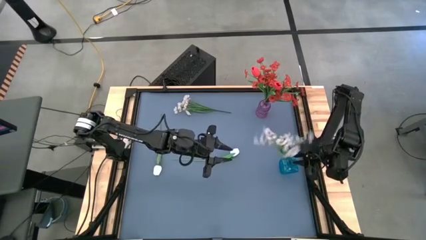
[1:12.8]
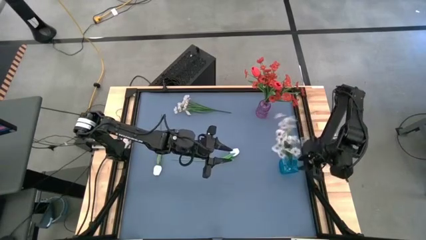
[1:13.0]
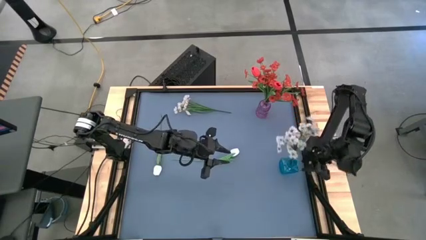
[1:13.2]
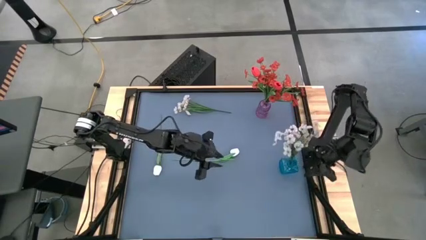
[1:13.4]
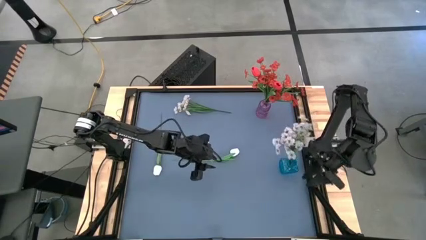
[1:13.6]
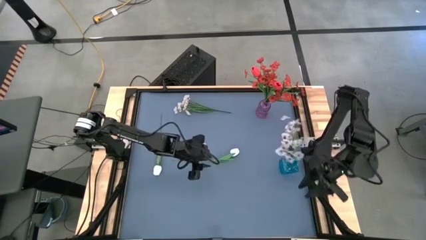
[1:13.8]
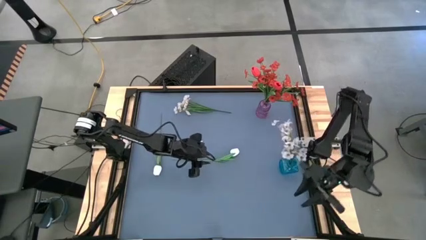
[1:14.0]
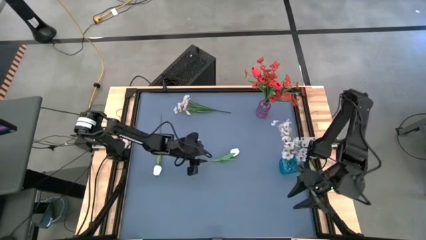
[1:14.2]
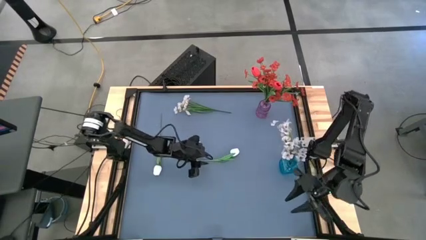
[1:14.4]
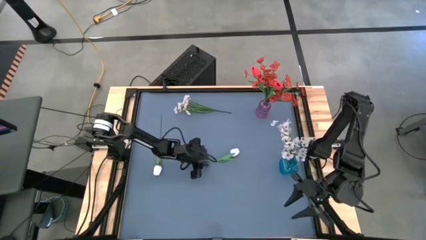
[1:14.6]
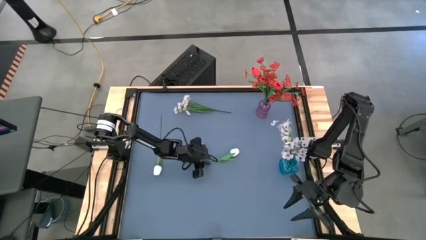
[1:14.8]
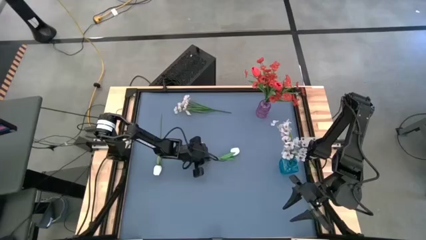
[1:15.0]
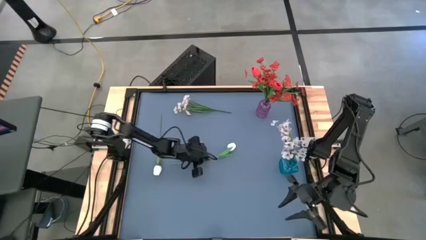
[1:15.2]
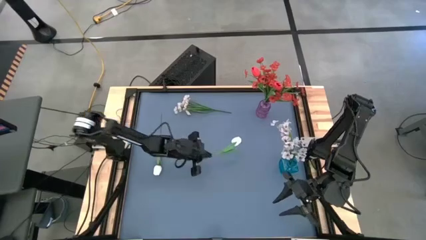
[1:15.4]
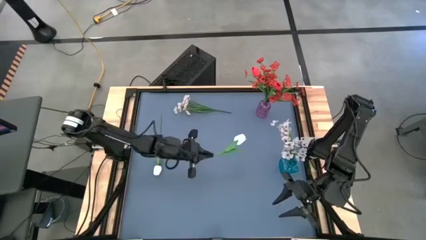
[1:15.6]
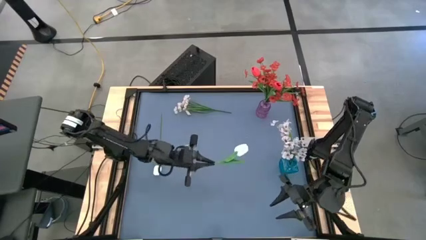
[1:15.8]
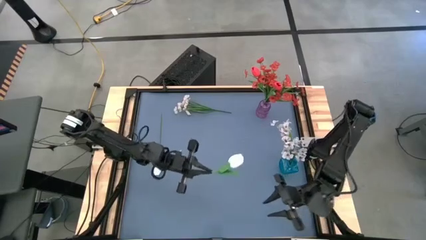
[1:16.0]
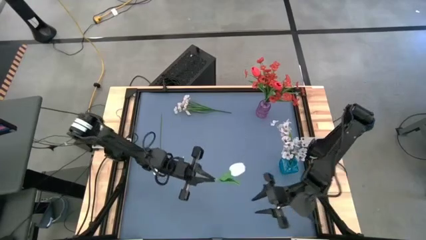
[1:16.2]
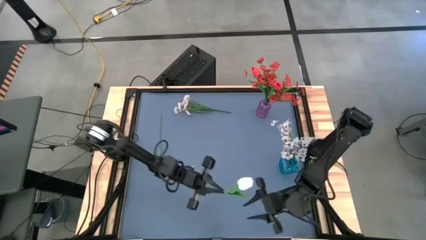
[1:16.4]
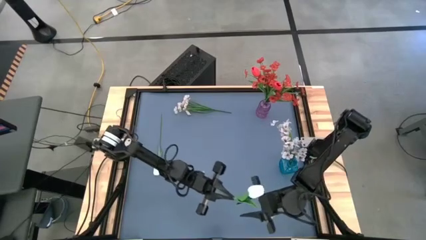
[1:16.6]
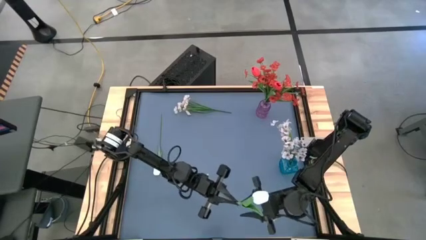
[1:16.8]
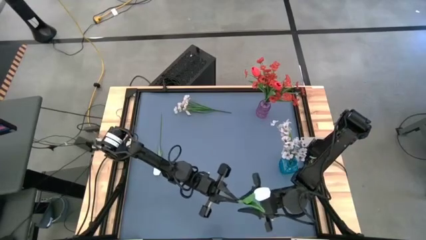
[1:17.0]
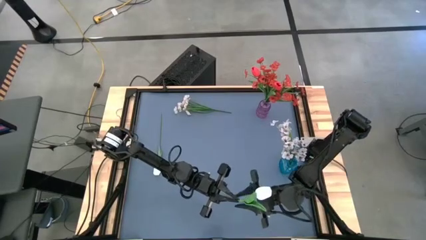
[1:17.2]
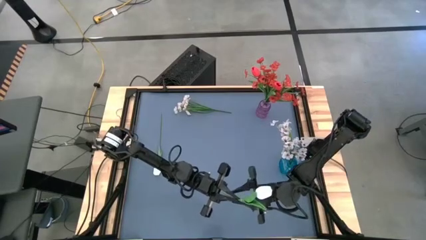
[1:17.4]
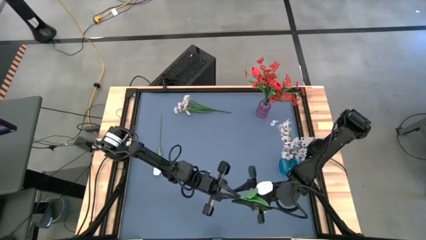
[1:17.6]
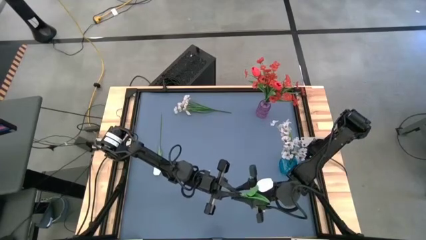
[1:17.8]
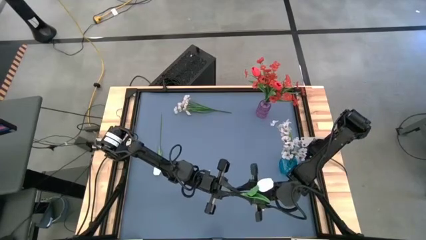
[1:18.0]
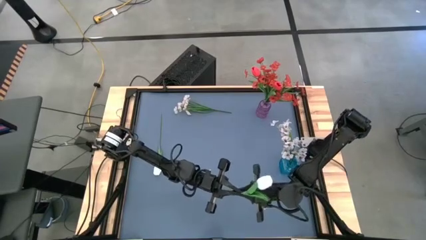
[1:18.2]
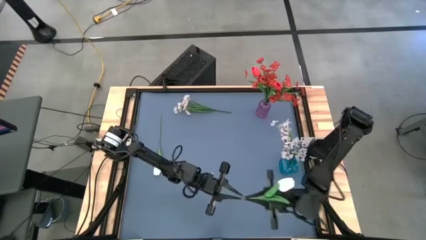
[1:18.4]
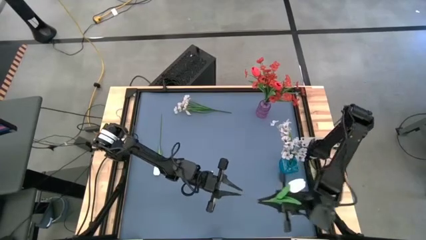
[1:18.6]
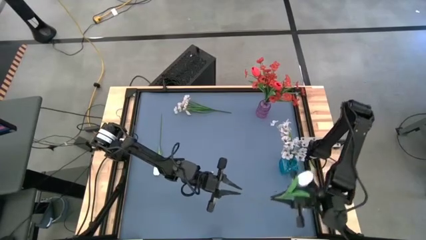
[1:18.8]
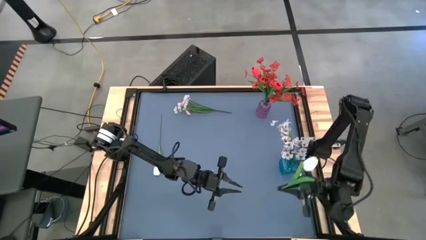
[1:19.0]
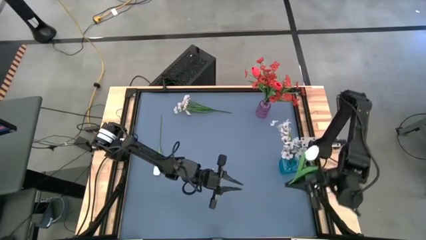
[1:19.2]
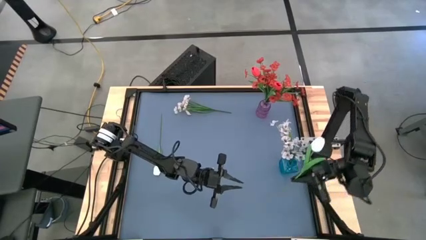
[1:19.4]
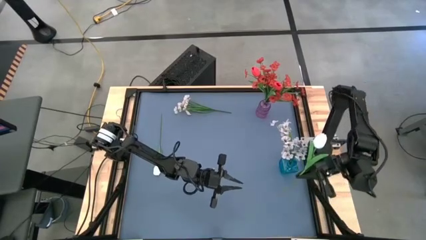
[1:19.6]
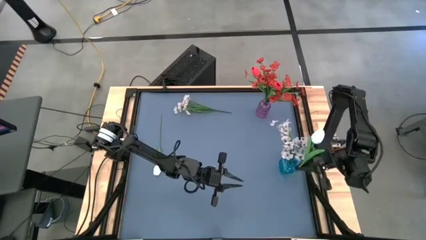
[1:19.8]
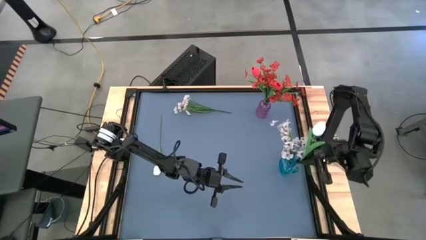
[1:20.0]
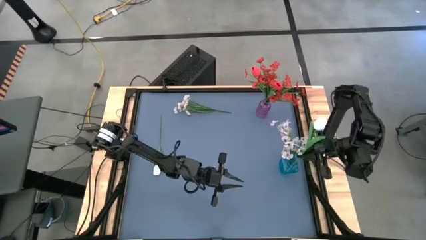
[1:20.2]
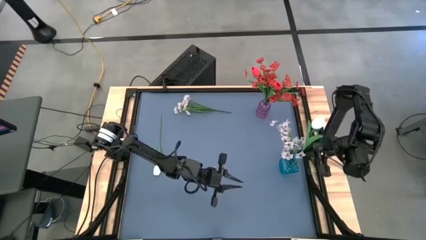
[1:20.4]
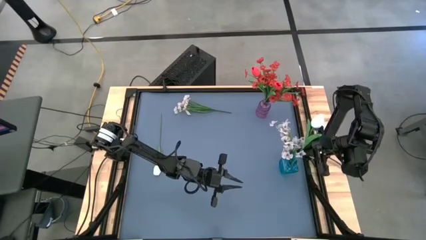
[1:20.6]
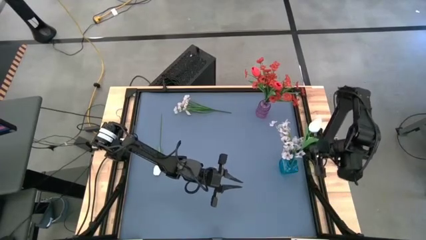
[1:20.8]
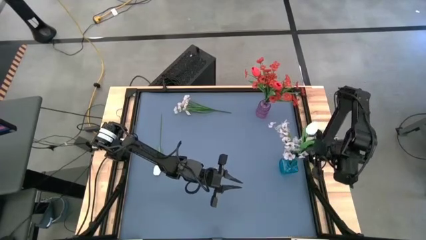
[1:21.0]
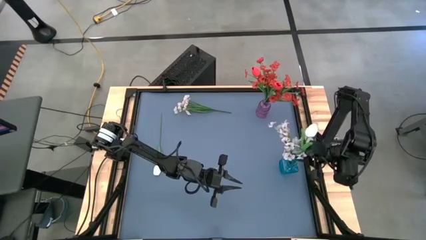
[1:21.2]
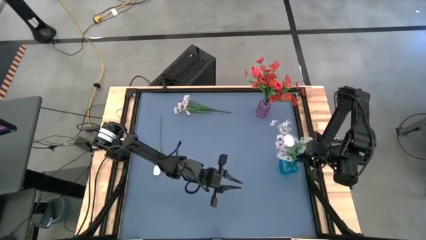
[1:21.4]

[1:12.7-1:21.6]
Task: Sort flowers into vase by color
Put the right white tulip into the blue vase

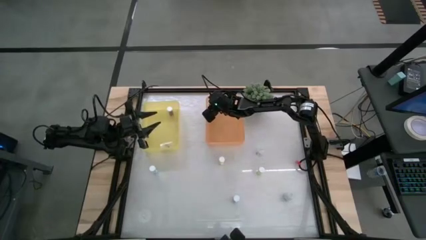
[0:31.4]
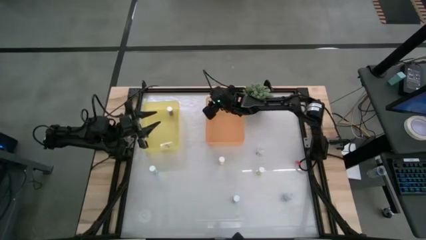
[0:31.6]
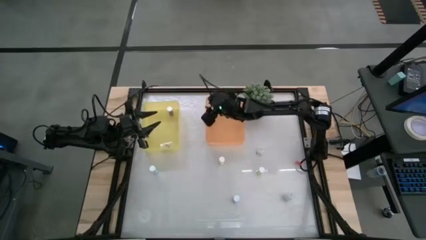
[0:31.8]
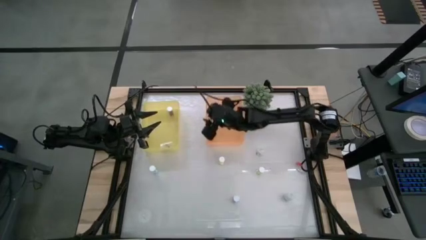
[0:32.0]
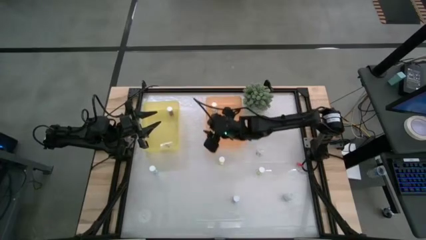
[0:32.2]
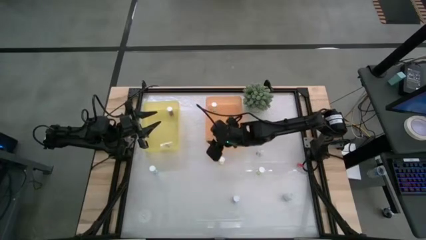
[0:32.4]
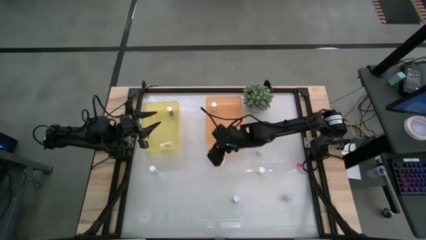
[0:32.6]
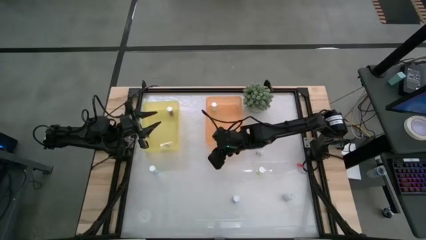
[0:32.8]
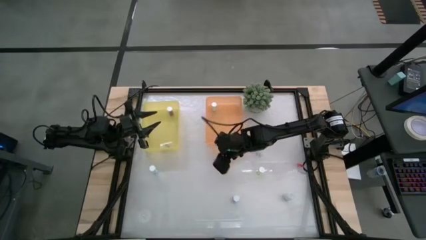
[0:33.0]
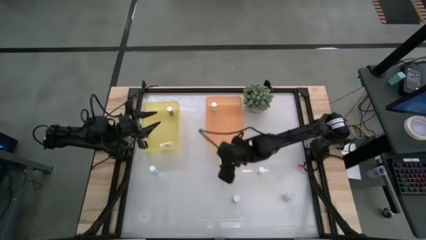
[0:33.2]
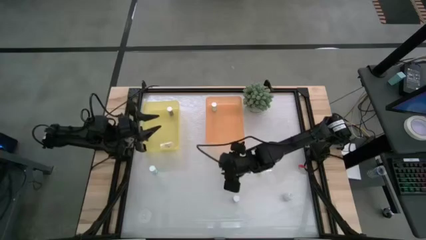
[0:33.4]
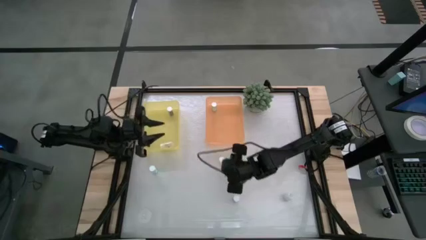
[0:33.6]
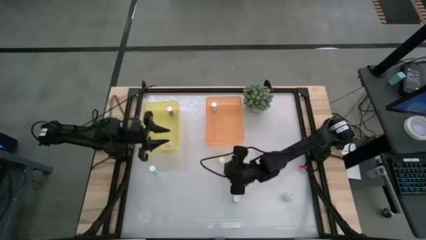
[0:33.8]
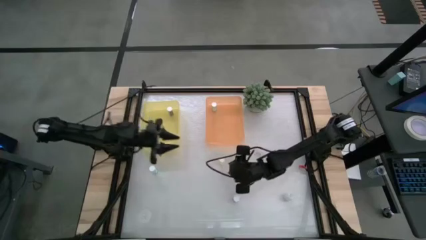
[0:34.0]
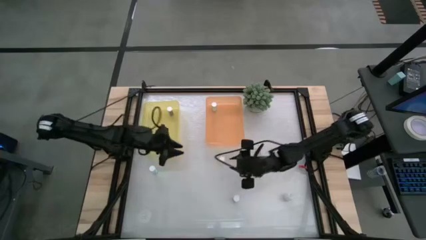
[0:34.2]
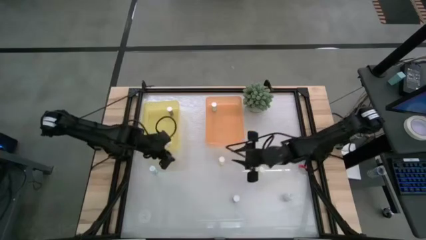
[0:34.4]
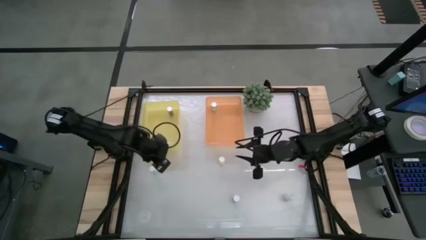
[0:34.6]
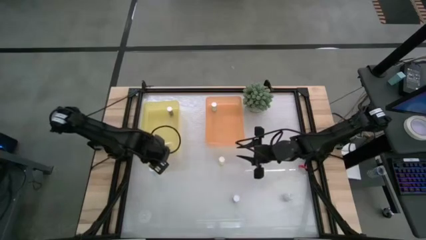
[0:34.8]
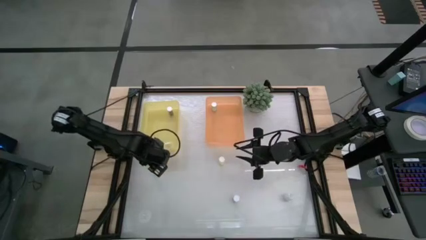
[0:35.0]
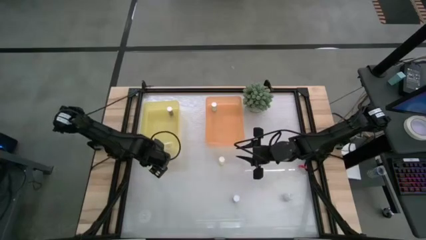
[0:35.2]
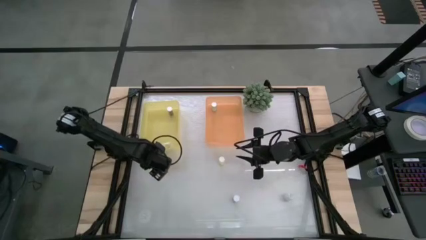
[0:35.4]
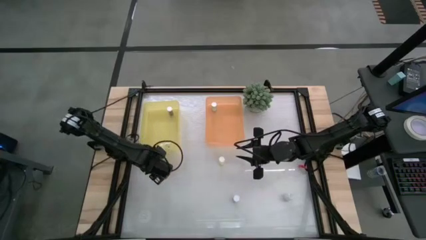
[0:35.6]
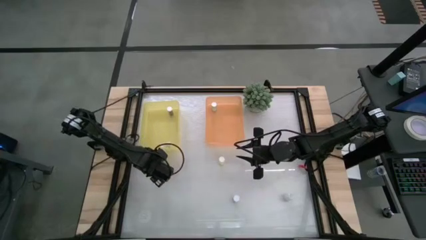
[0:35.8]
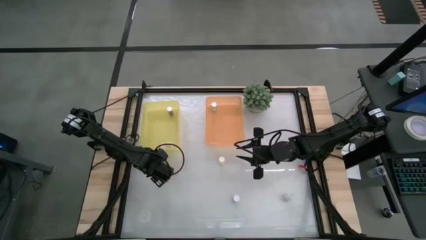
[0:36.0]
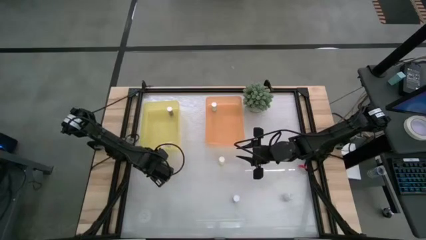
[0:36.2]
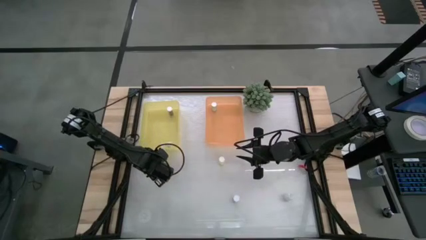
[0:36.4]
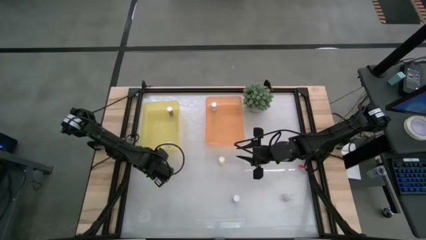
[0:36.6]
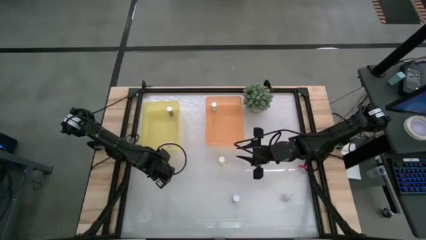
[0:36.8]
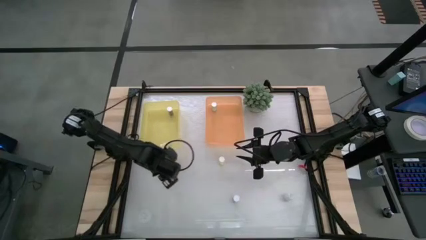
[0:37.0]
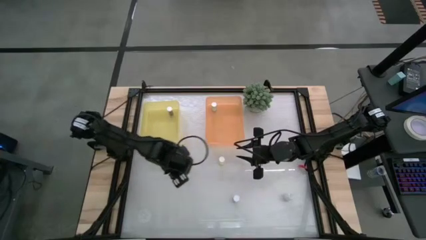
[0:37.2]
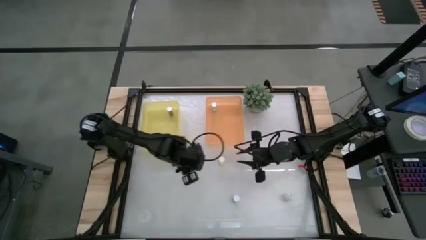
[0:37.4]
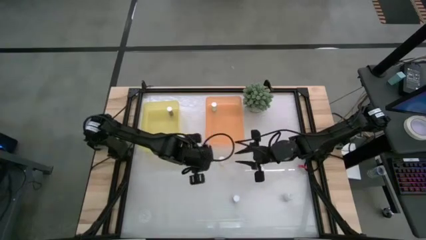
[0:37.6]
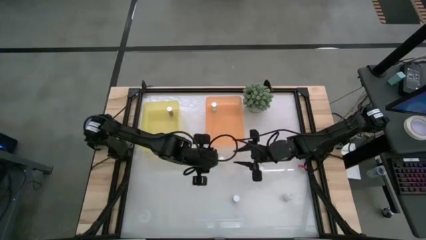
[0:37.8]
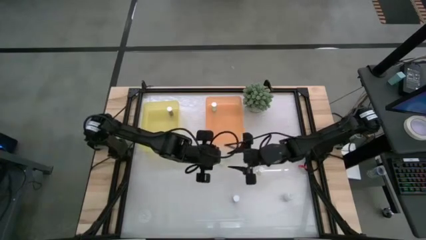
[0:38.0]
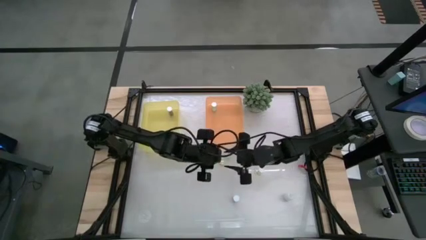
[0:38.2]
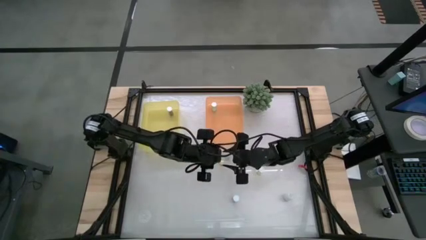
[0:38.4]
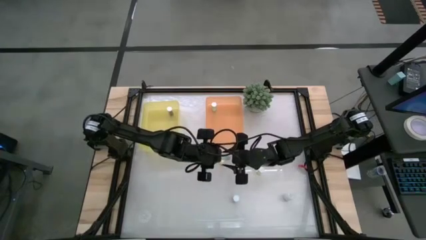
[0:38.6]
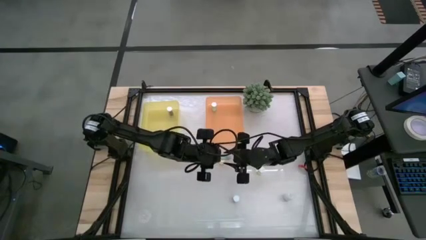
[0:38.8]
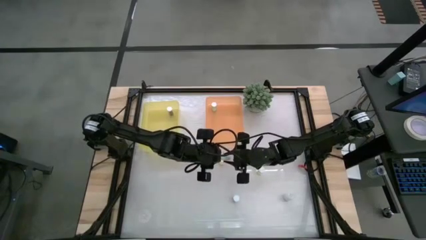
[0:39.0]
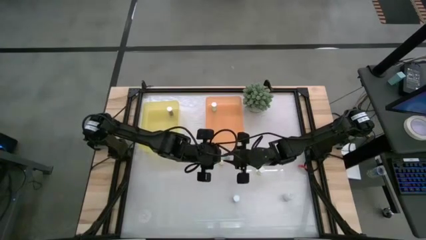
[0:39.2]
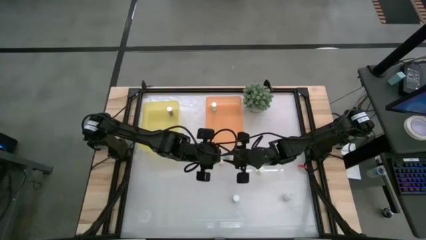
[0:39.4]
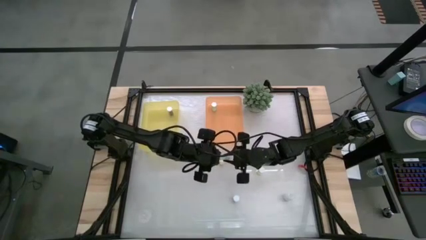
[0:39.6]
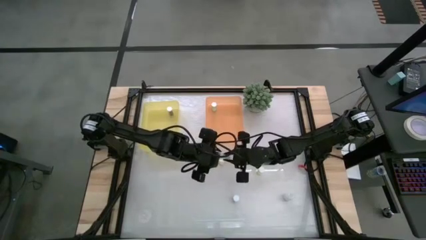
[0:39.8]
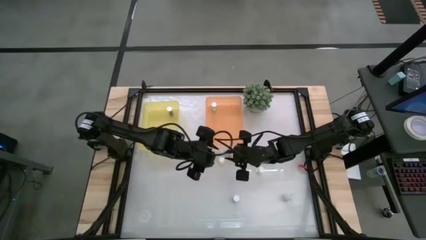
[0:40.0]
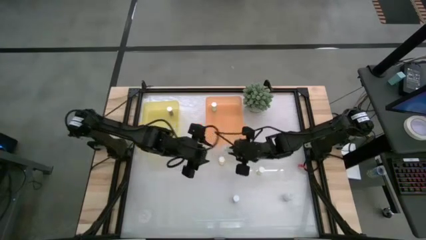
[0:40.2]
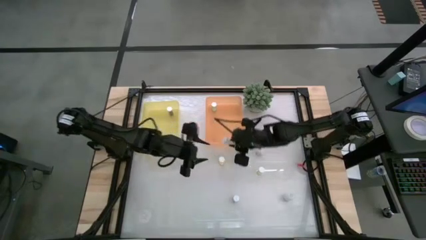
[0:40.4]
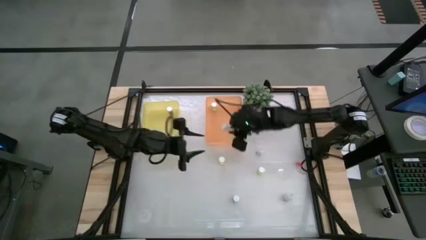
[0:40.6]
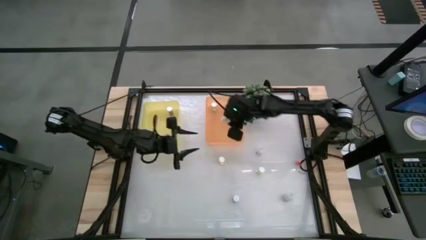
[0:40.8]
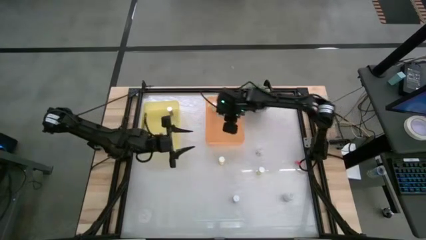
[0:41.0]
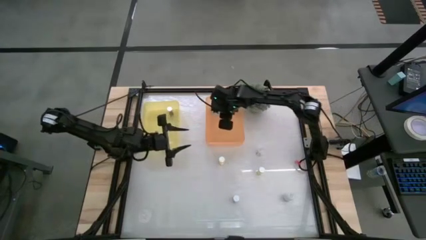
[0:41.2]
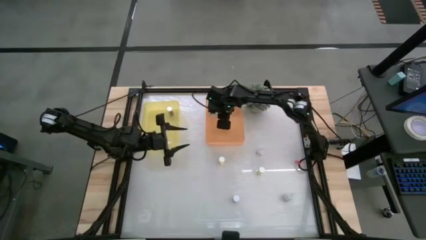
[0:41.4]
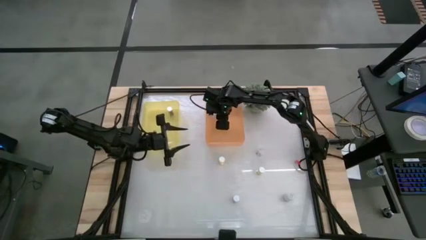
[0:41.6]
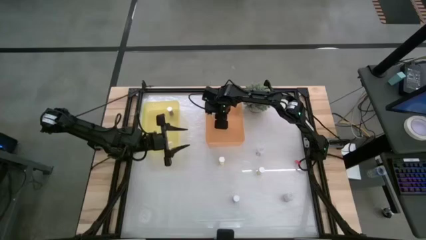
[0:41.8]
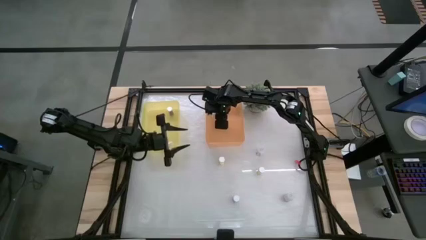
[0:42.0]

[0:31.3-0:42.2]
Task: Pick and place medicine bottles into bin by pill shape (circle, oval)
Put the green tablet capsule into the orange bin
